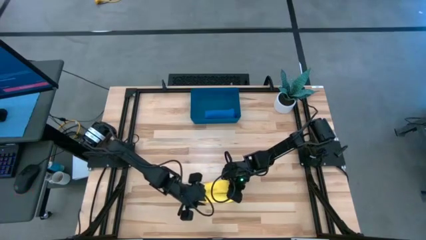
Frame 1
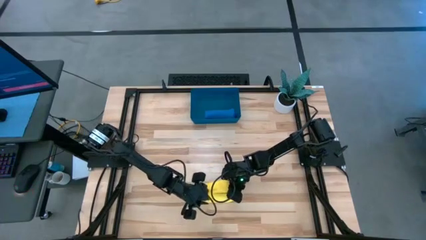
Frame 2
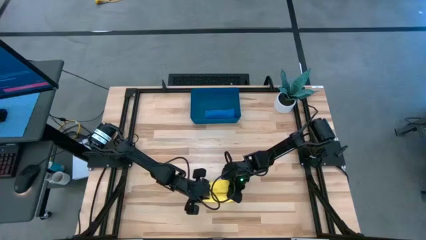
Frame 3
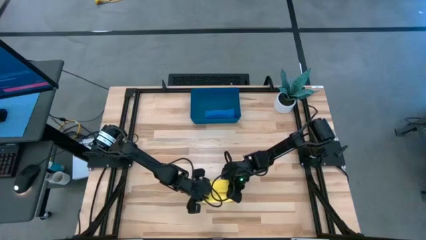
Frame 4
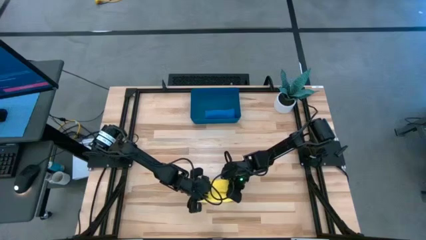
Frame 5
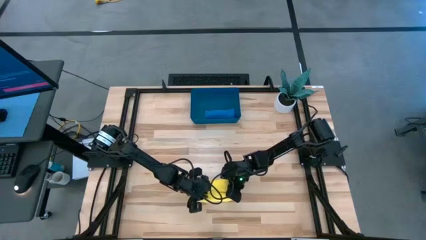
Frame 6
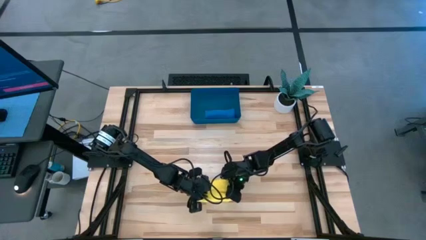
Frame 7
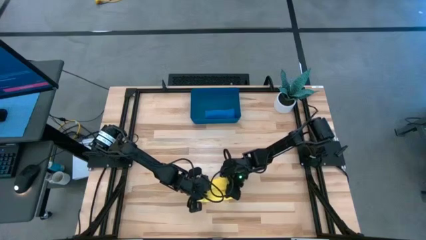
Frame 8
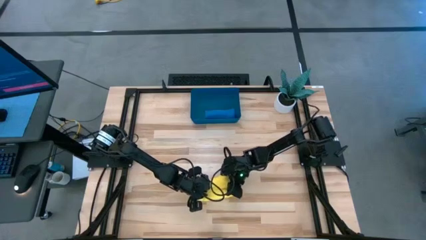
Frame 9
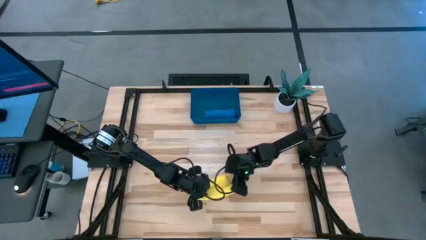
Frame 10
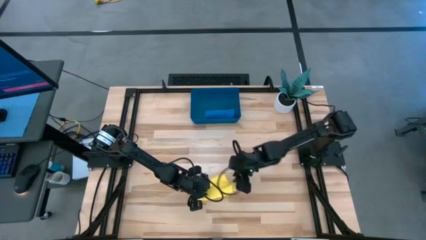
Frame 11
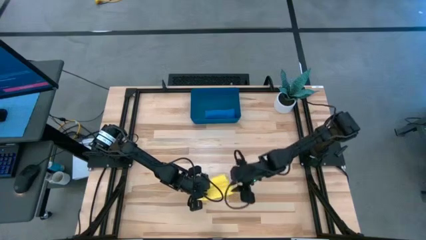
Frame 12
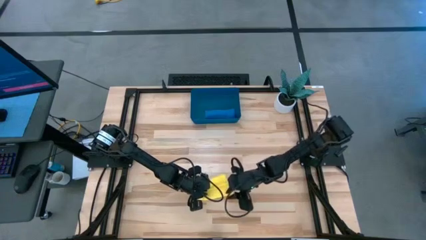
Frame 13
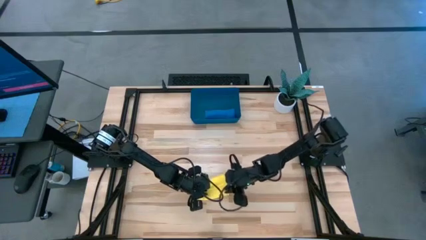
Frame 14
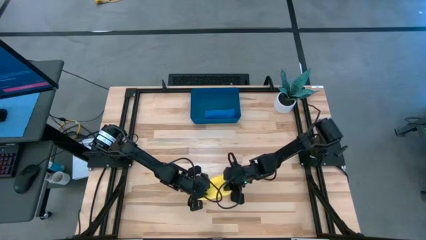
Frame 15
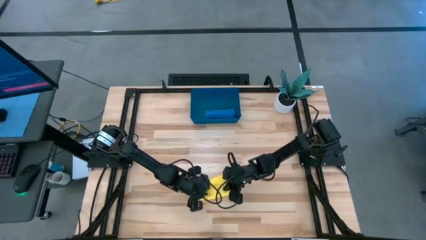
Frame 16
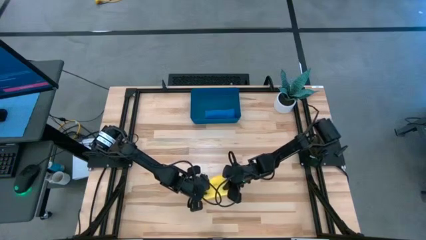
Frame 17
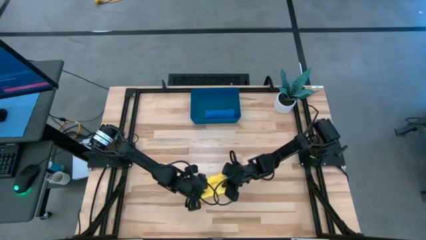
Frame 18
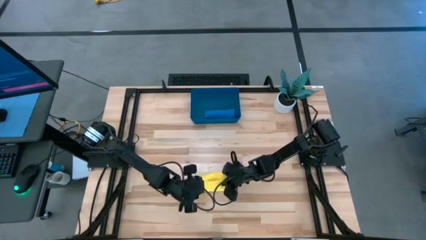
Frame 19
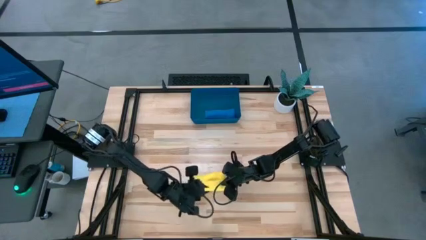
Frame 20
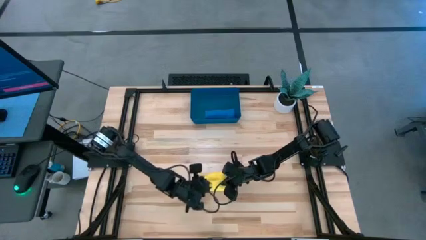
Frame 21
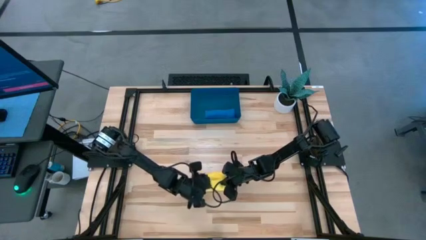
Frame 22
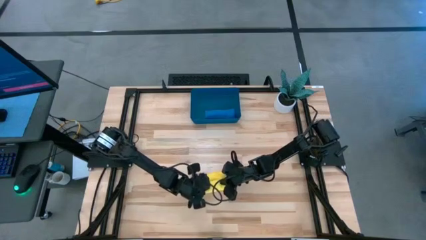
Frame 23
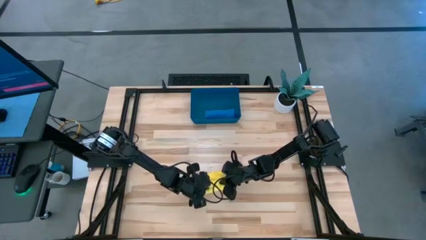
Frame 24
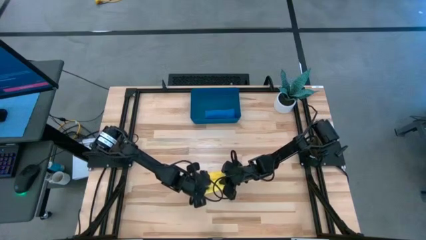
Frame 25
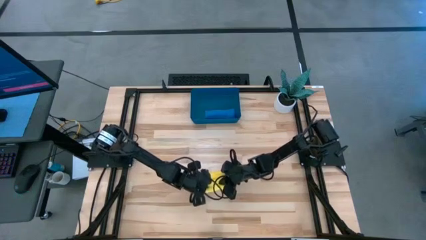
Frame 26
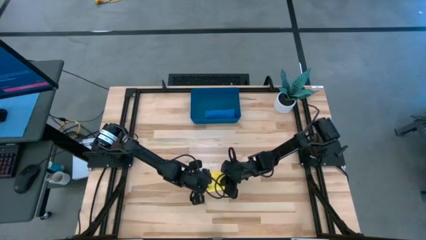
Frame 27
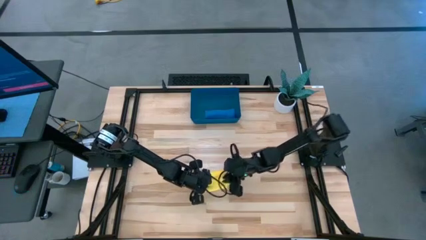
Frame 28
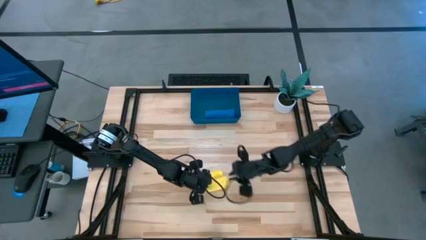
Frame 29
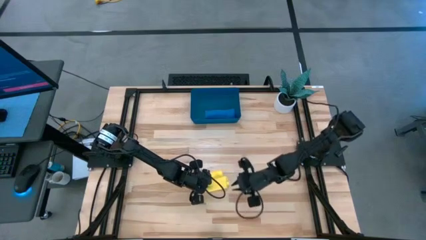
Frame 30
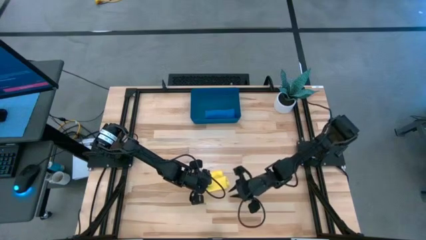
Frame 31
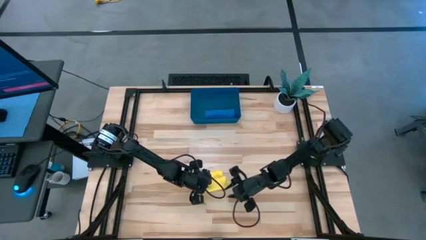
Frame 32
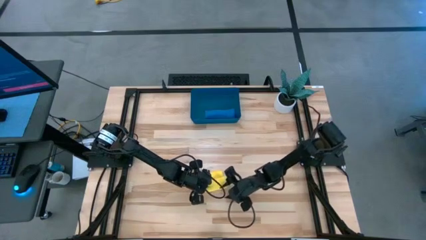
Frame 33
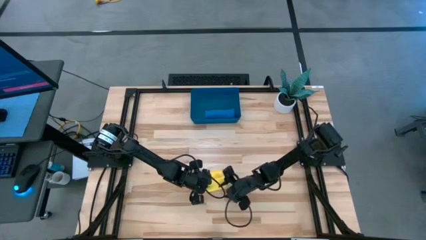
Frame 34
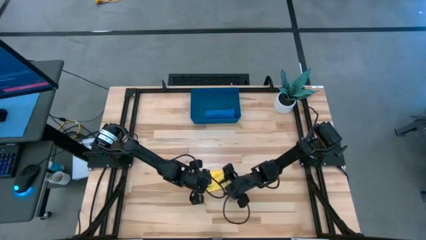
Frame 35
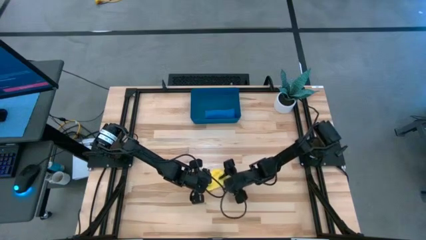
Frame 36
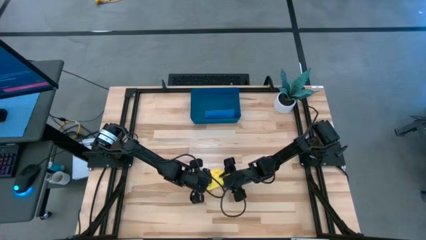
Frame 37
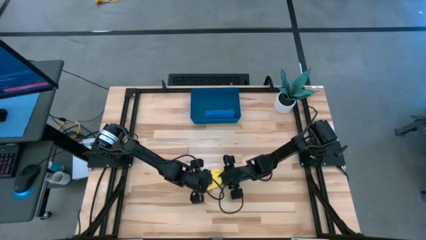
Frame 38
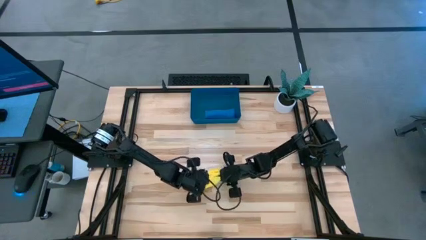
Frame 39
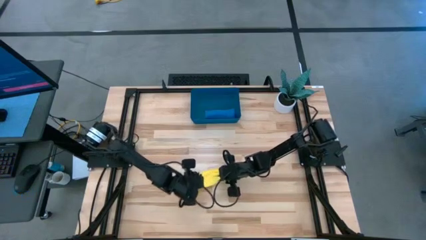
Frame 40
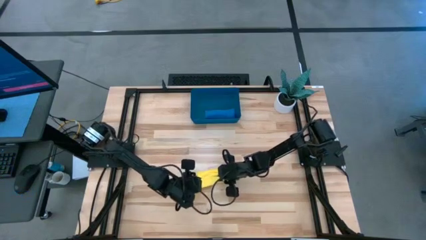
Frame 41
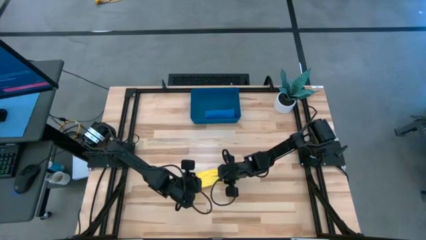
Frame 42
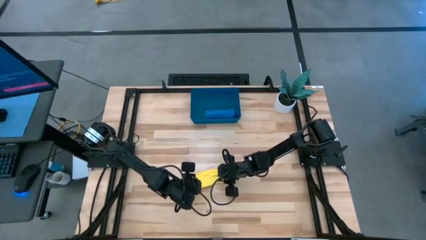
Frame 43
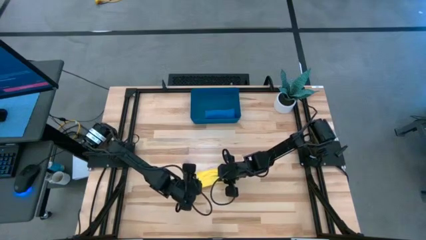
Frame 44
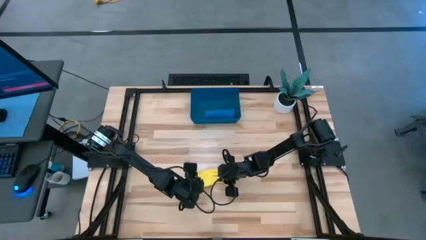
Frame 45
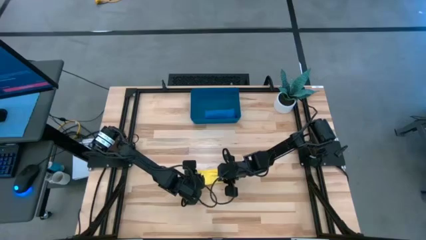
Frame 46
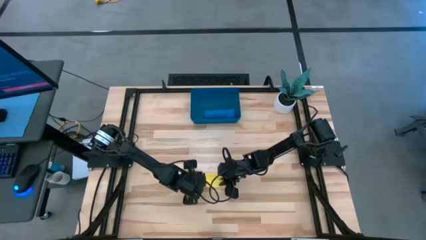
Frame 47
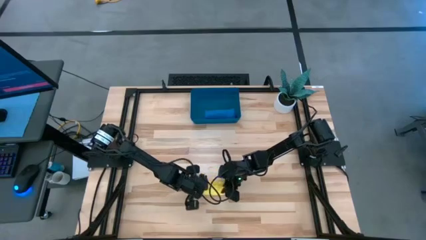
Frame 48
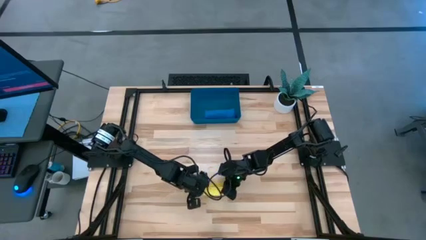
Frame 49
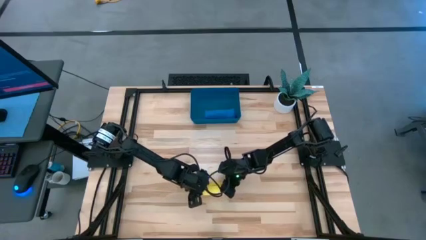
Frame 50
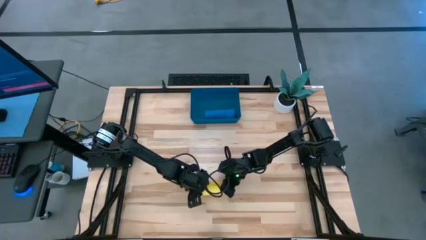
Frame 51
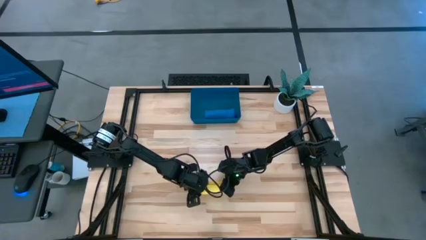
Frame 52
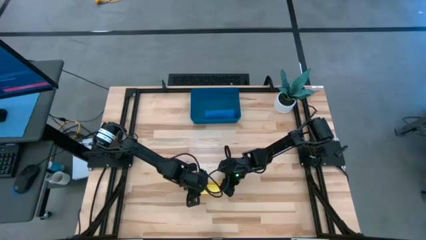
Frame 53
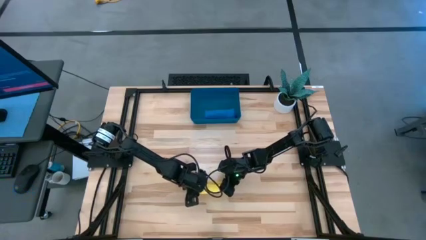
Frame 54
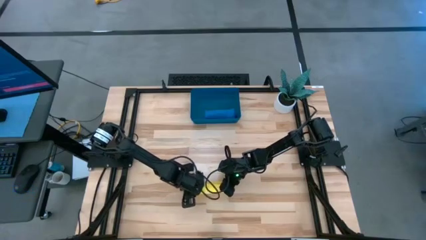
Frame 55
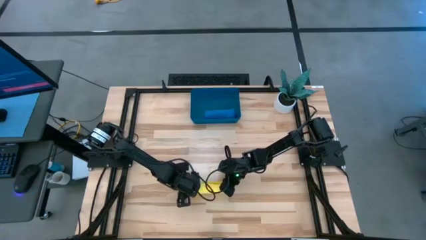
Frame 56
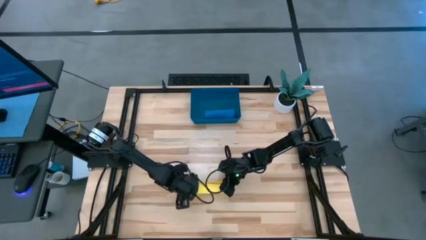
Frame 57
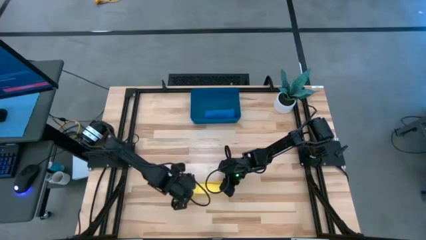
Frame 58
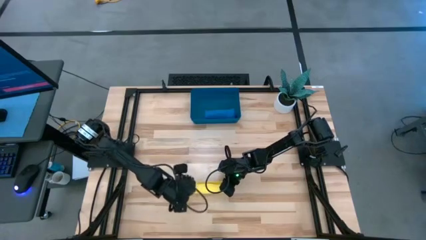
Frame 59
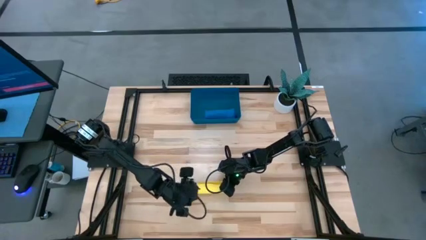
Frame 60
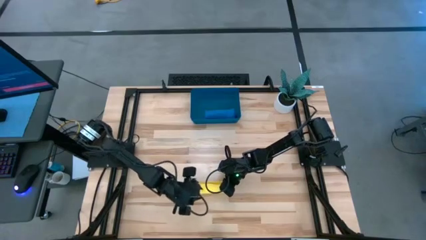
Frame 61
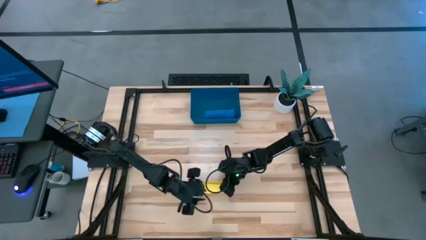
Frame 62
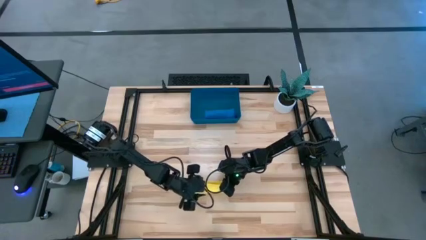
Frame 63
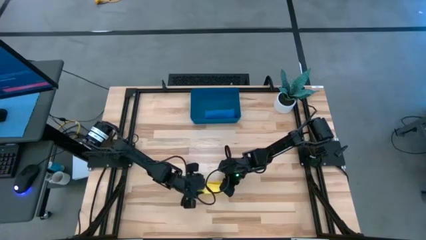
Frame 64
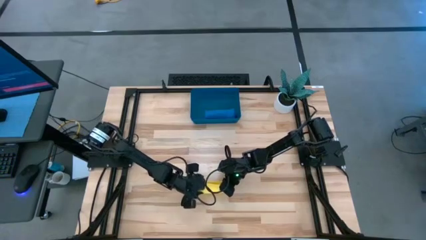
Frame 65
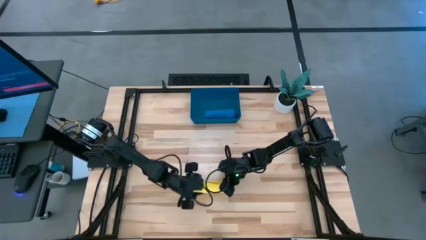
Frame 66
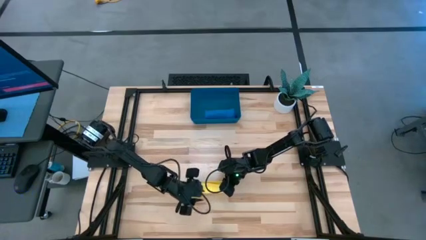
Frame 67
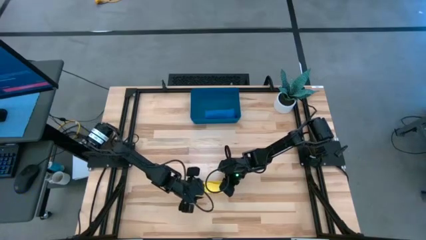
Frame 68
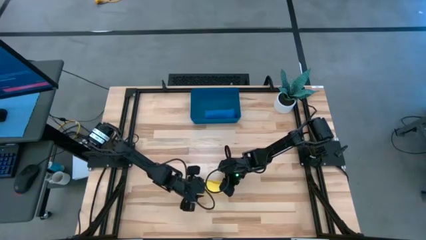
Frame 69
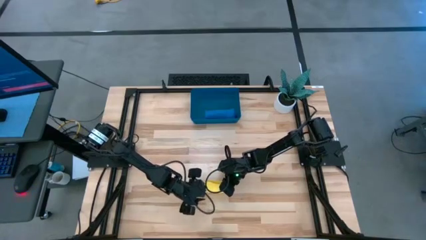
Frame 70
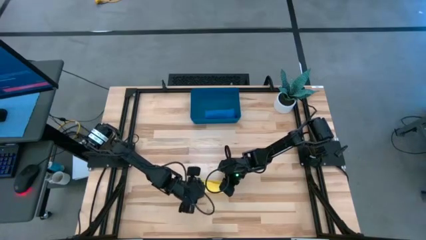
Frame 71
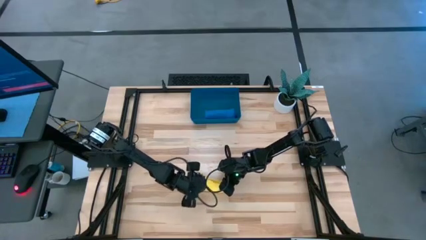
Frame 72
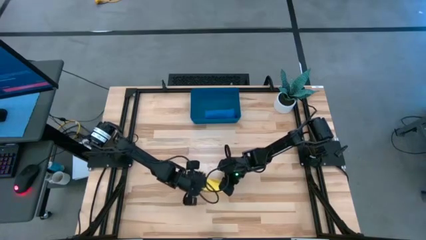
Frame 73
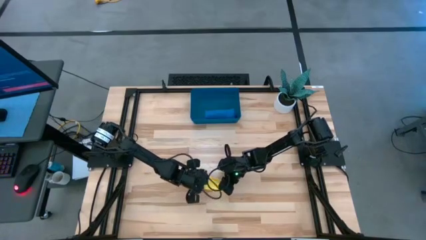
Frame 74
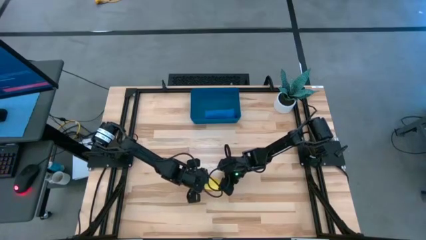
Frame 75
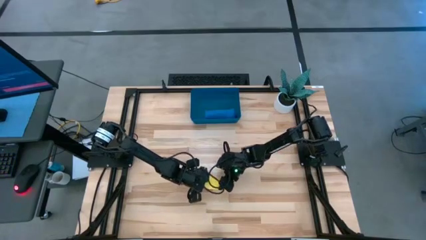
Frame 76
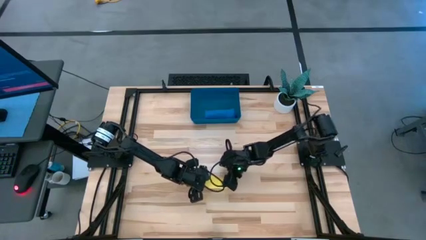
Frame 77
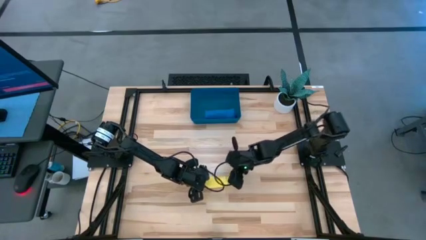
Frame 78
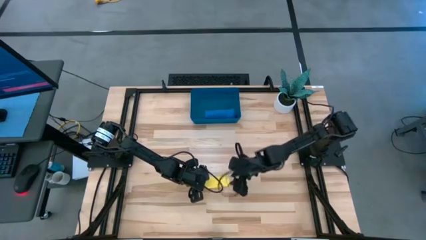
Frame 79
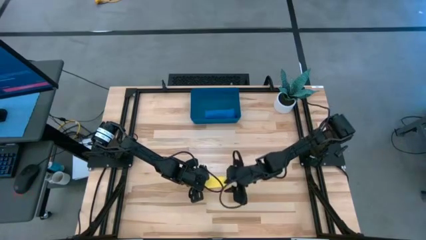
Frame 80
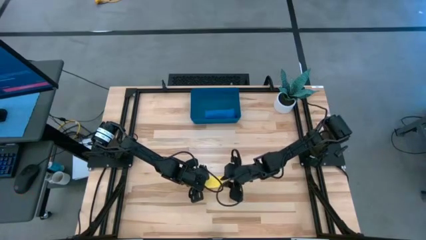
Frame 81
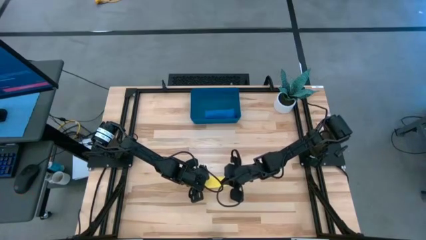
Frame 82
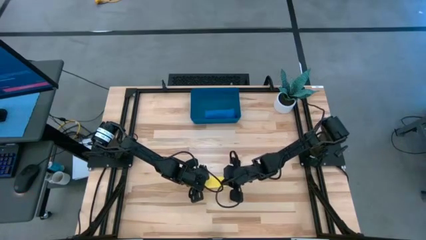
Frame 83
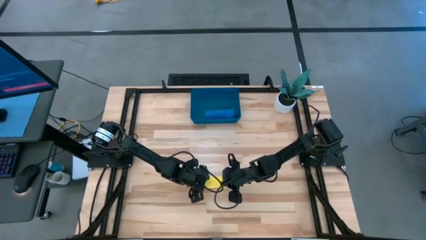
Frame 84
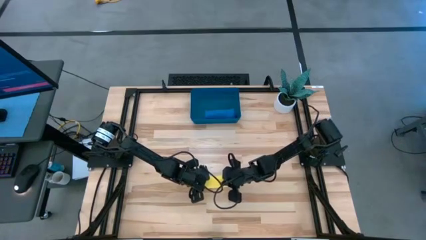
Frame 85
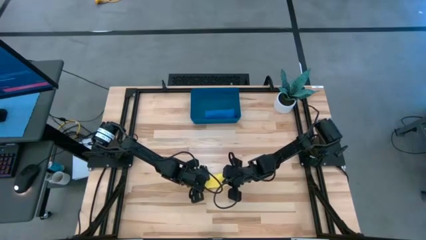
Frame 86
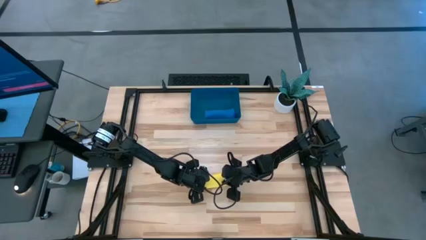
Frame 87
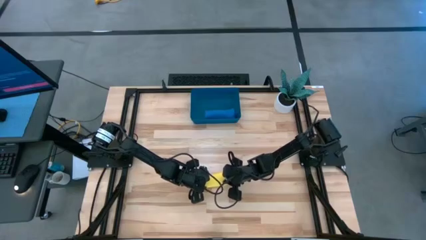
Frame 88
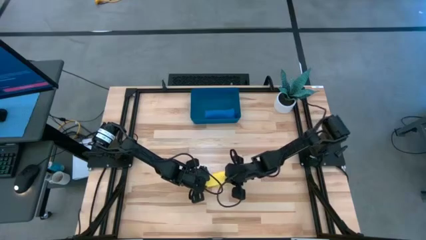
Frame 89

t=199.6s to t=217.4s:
Task: Roll microfiber towels into tight, uniform cylinder then place into a basket
Roll the yellow towel
